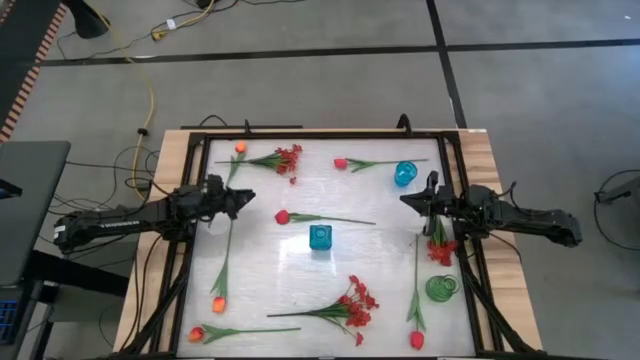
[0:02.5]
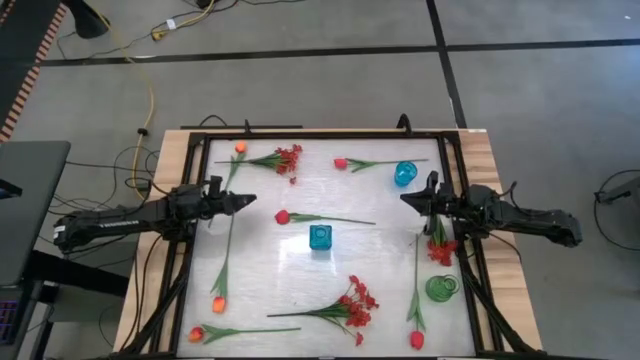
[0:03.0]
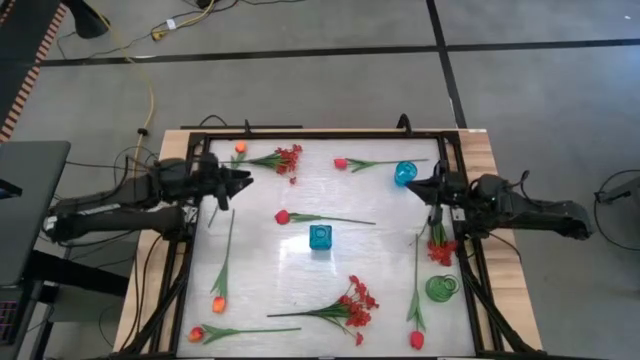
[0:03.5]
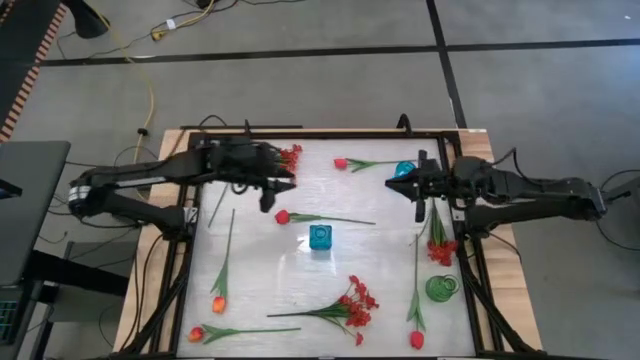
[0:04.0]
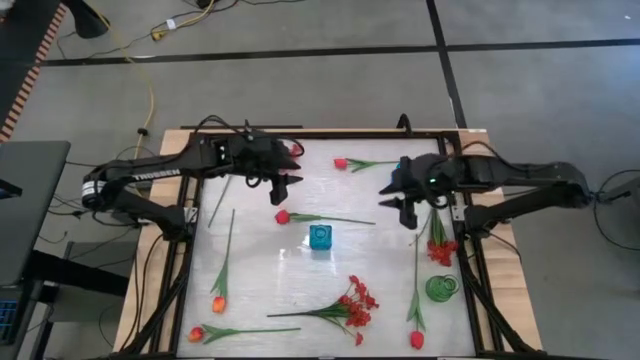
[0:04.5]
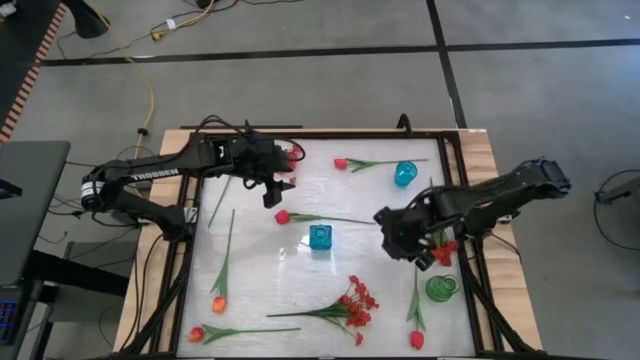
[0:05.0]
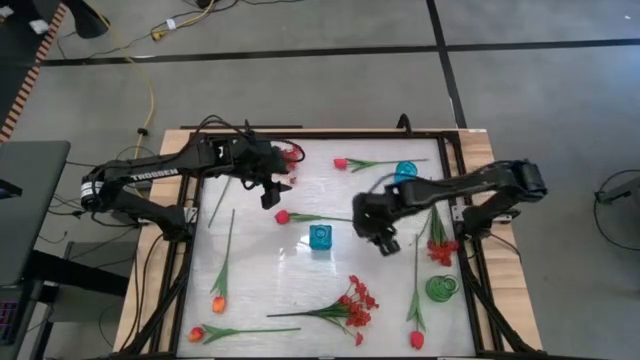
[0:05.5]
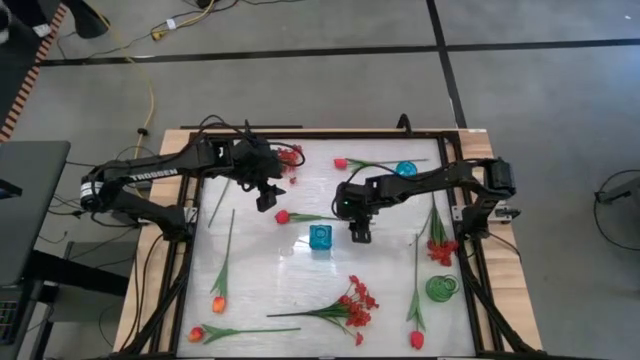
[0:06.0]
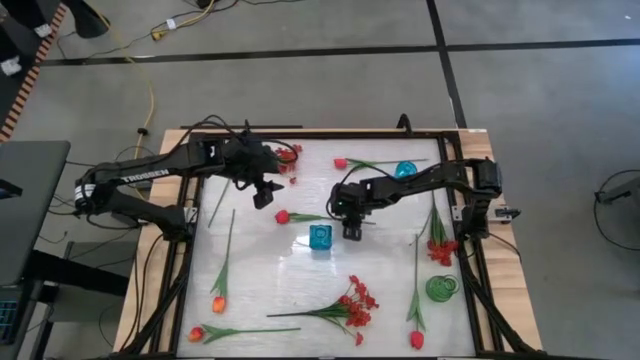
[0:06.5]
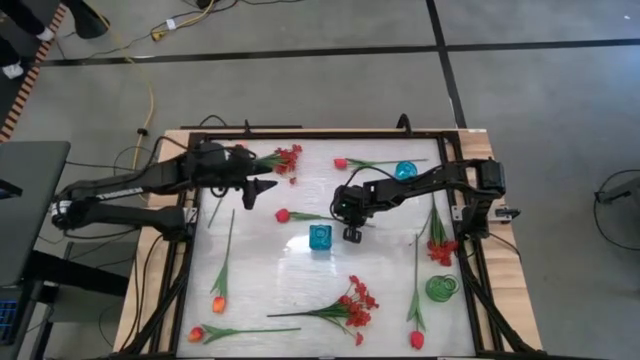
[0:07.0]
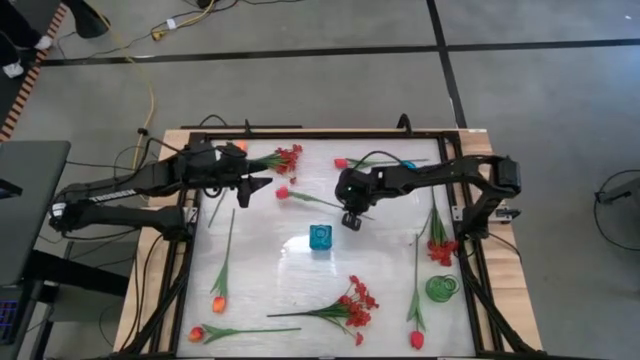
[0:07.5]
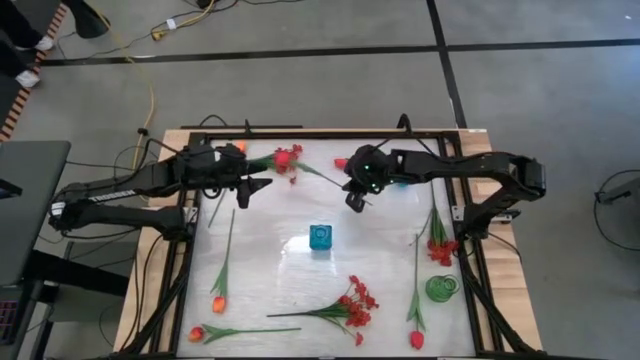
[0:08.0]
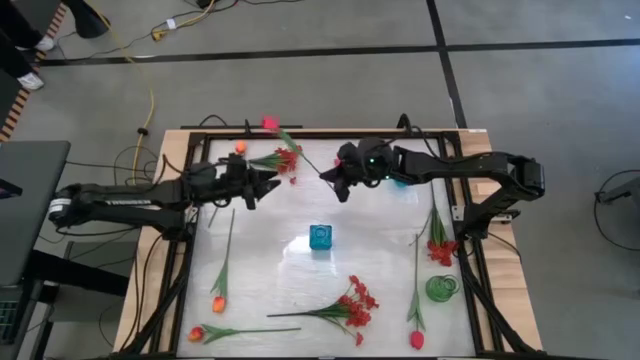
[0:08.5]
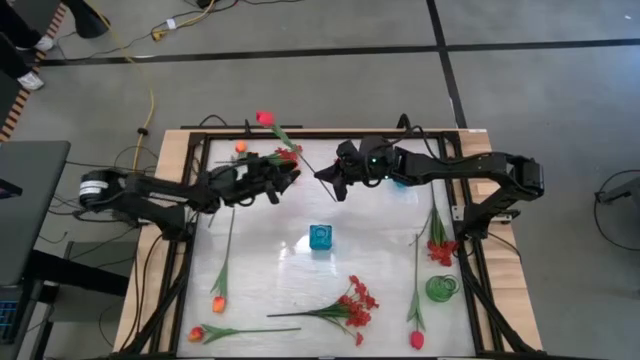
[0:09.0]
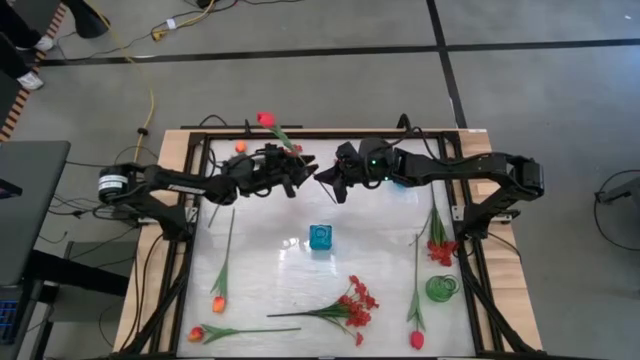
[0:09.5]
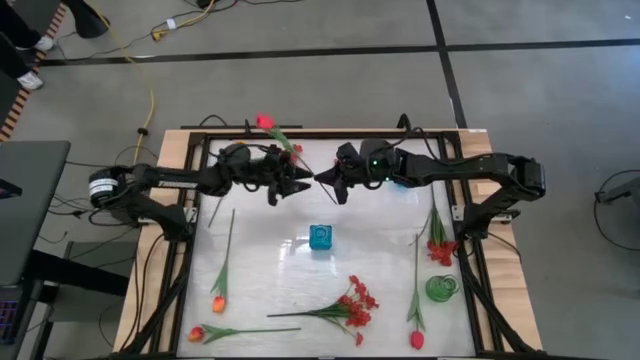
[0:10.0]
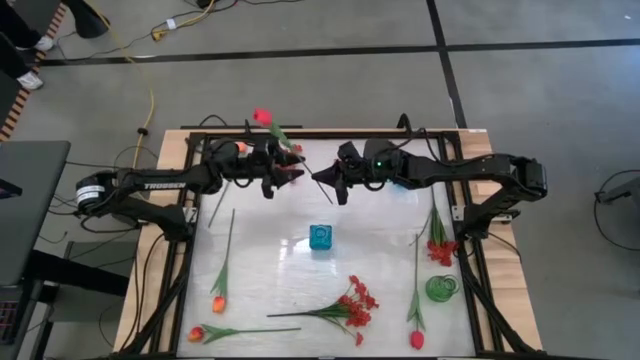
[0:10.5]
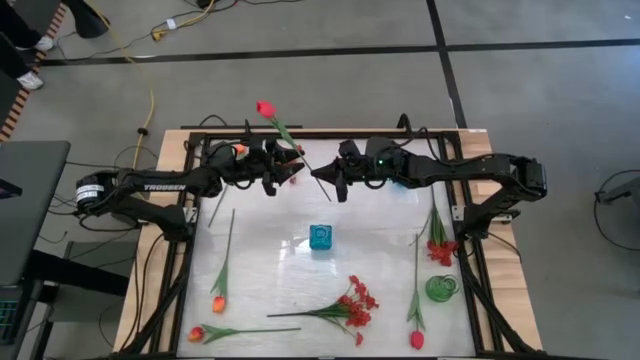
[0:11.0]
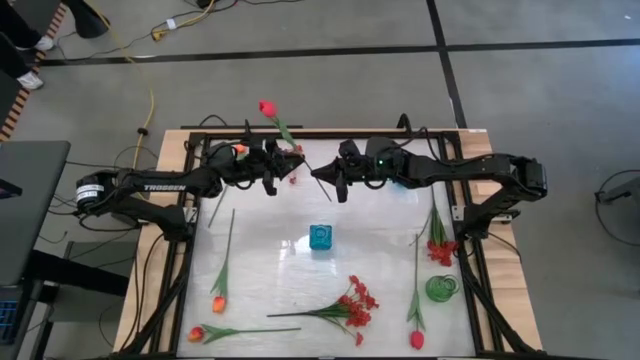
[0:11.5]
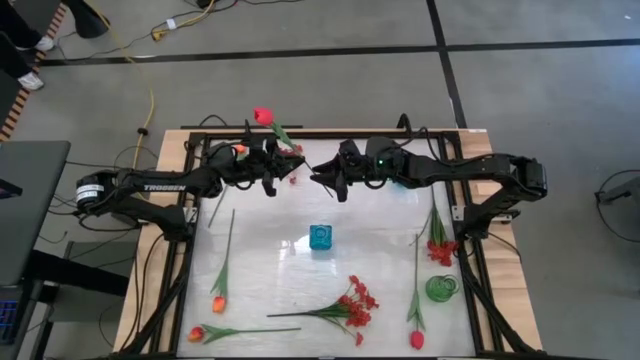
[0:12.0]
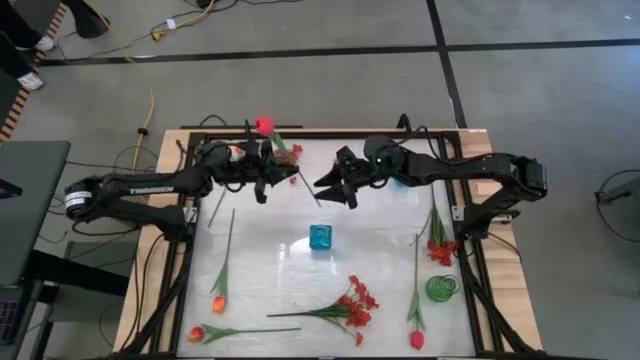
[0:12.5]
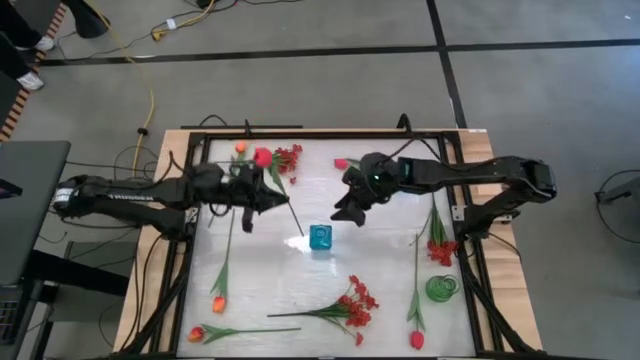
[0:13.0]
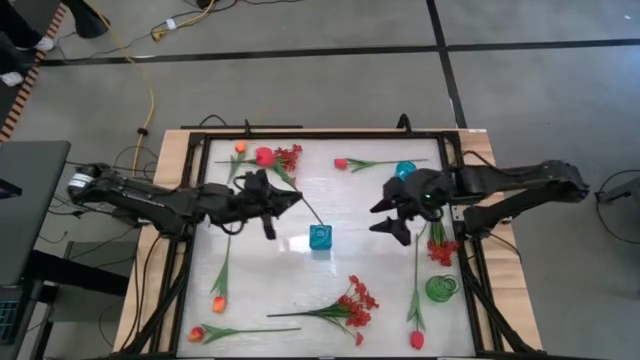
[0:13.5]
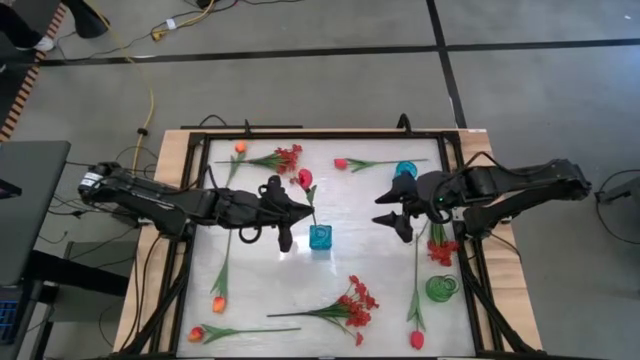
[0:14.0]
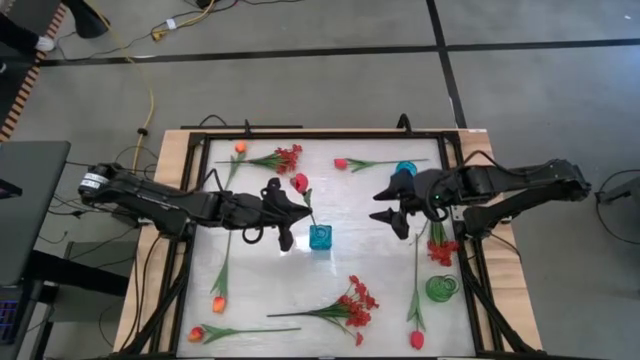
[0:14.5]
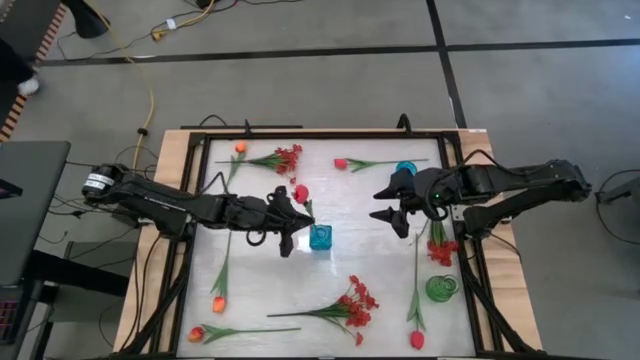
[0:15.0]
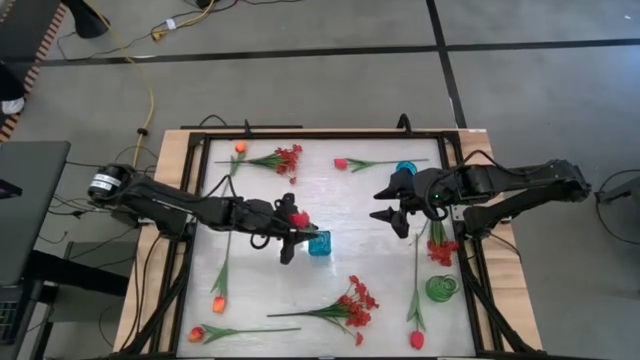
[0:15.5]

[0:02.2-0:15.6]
Task: Sort flowers into vase by color
Put the center pink flower into the bottom blue vase

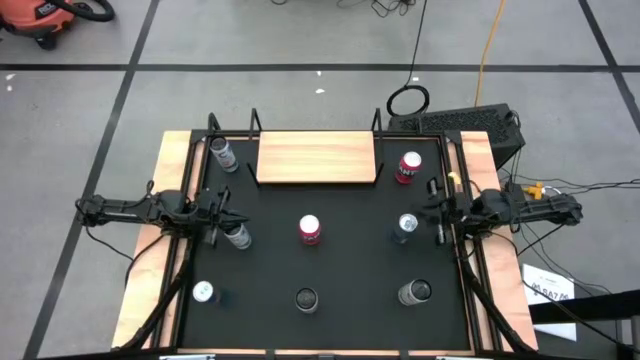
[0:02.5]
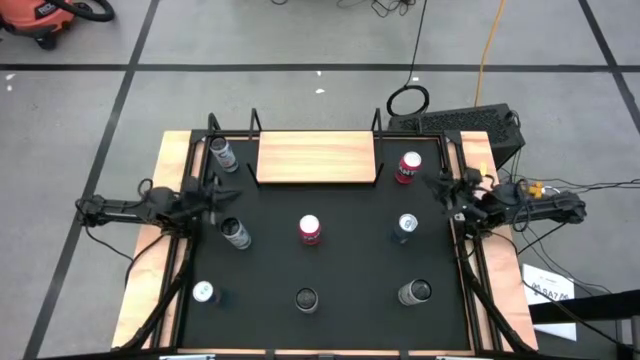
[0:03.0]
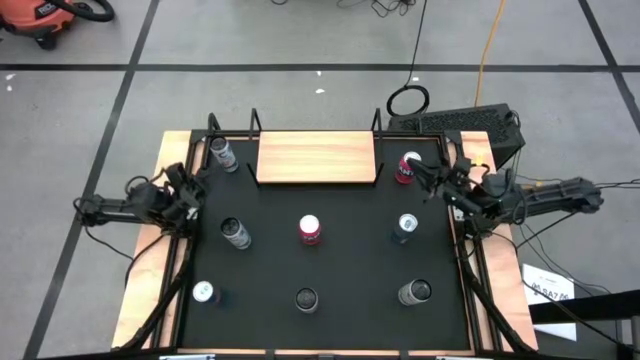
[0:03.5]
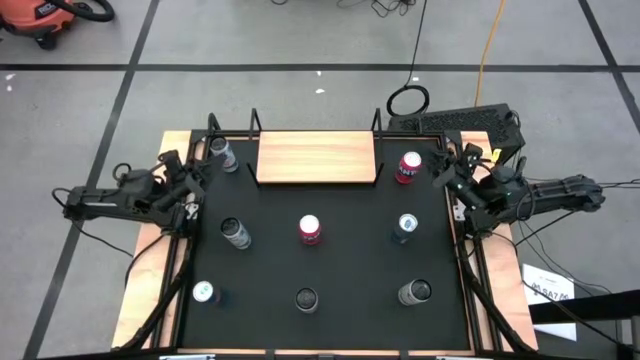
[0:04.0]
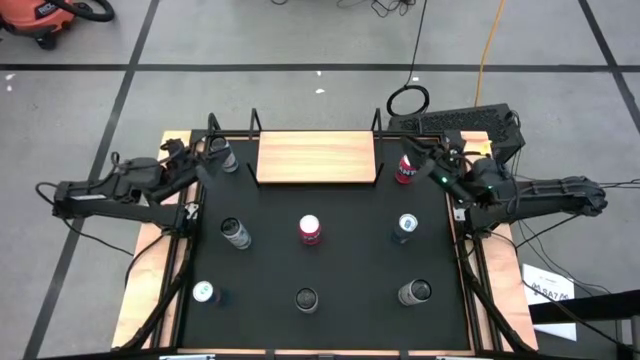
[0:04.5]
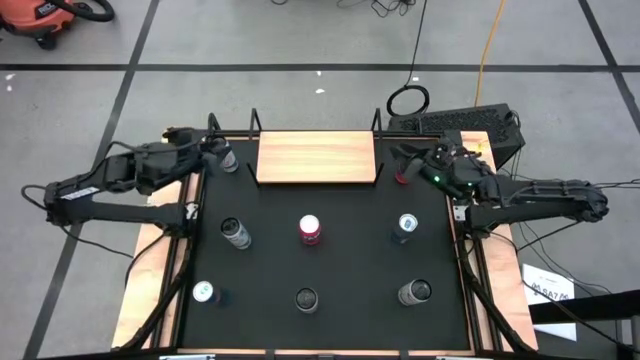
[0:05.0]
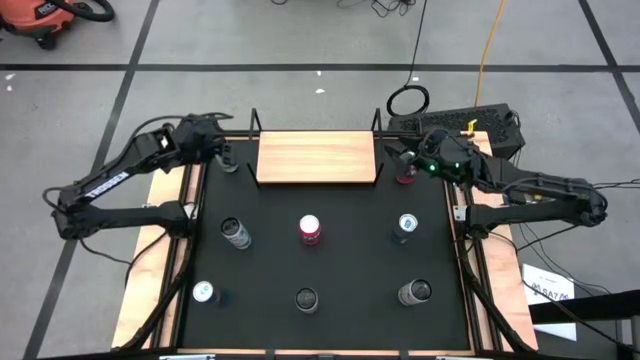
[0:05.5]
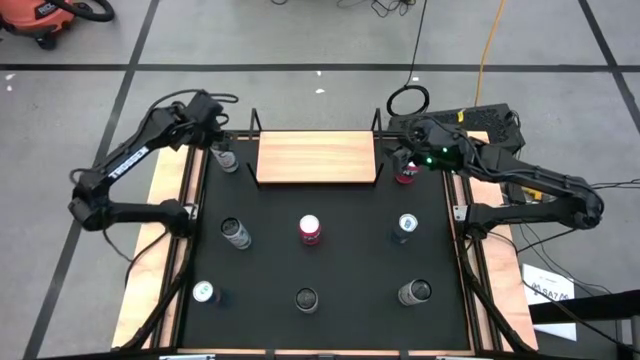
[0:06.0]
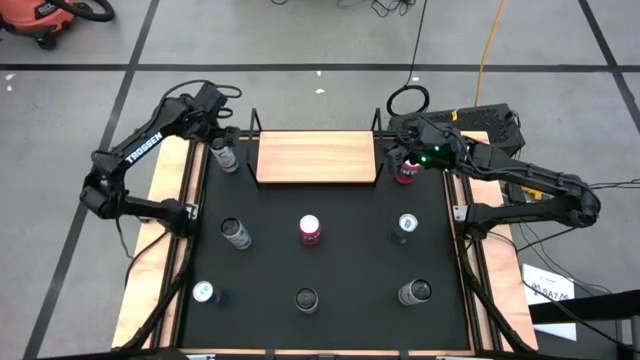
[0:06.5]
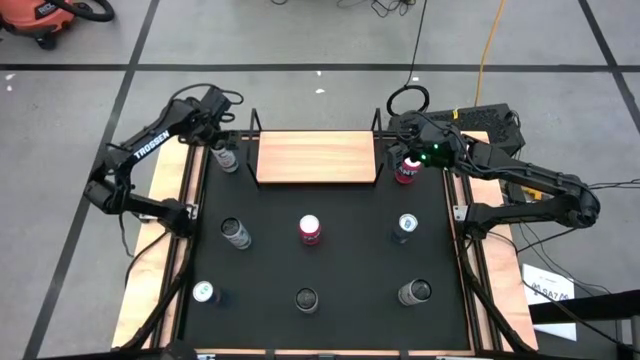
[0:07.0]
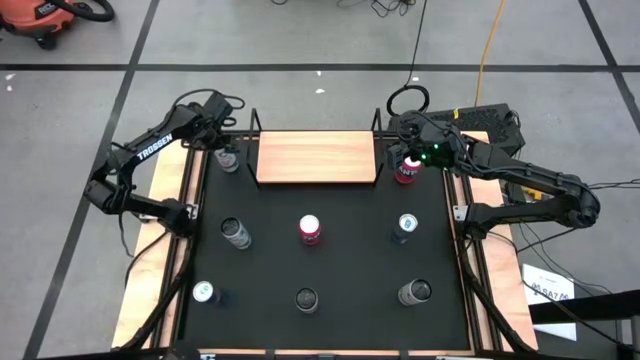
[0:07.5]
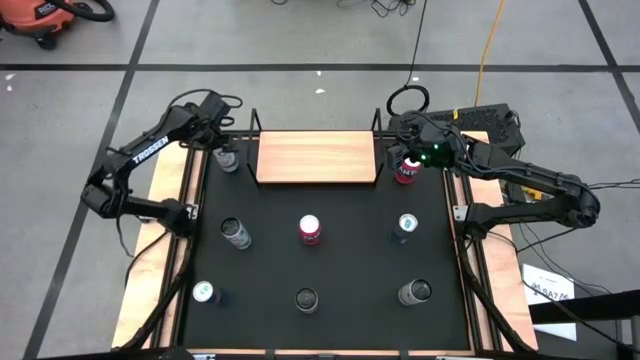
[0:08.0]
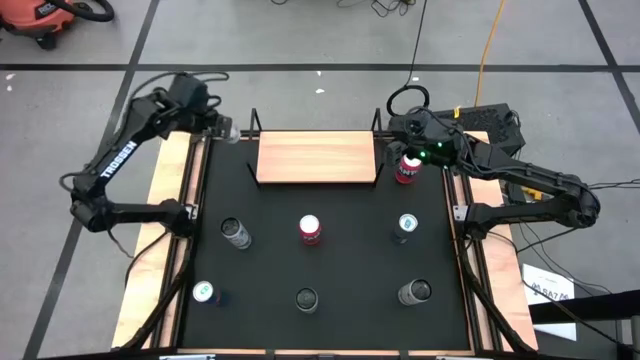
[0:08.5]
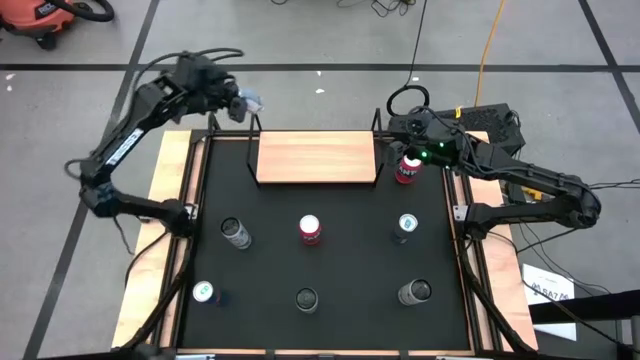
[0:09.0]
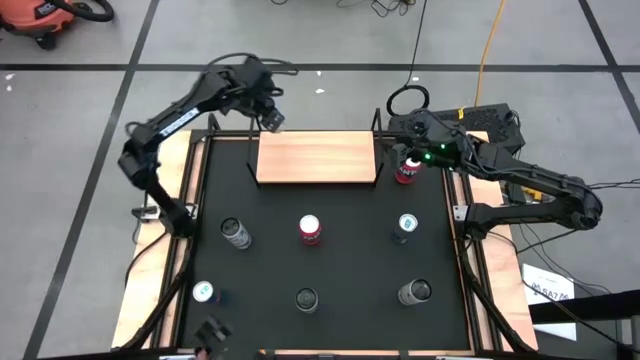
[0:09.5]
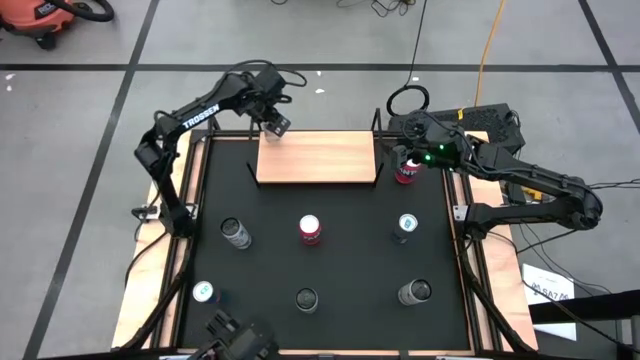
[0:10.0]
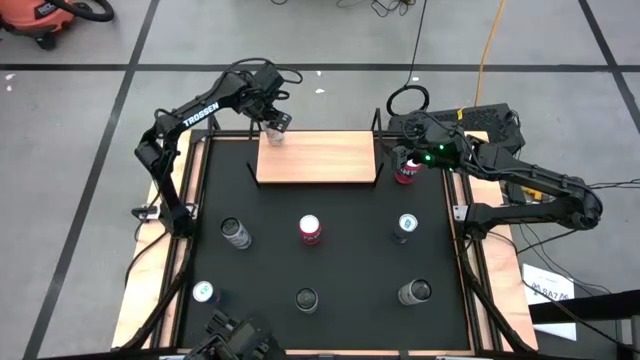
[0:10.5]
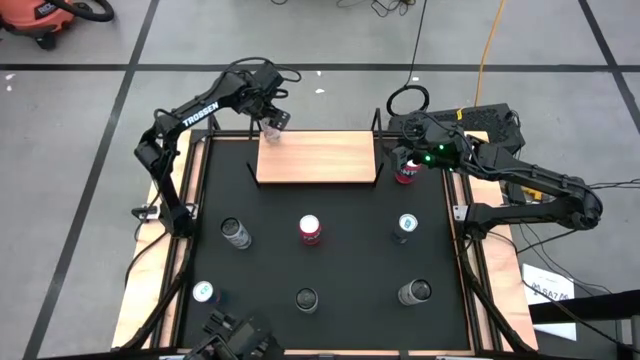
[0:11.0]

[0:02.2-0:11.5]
Task: Place canned beverage on shelf
Put the top white-pink soda can on the shelf
